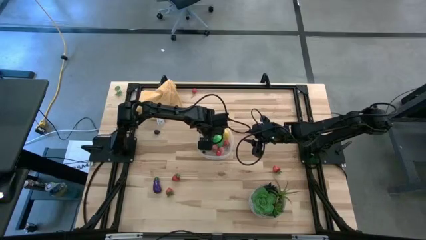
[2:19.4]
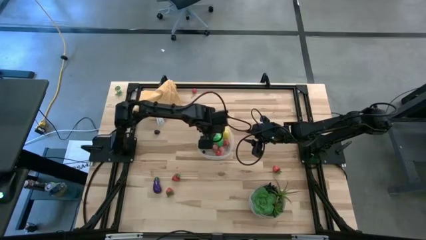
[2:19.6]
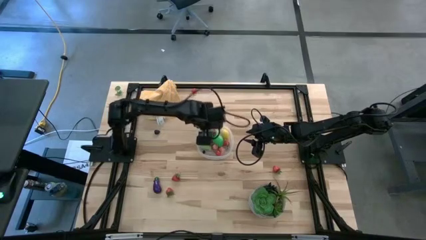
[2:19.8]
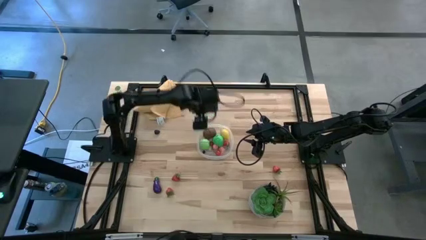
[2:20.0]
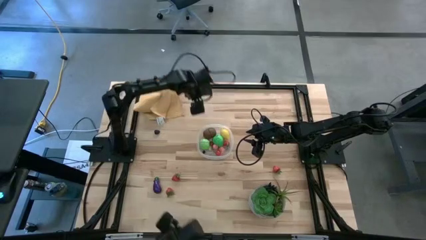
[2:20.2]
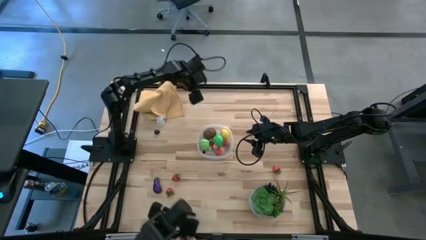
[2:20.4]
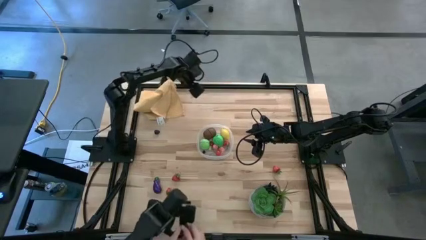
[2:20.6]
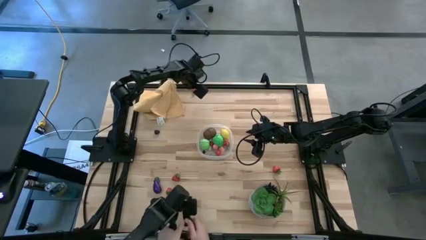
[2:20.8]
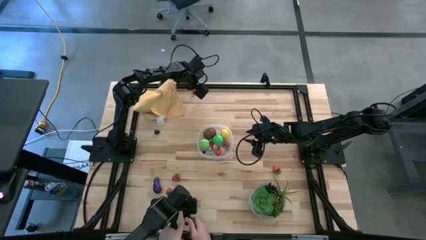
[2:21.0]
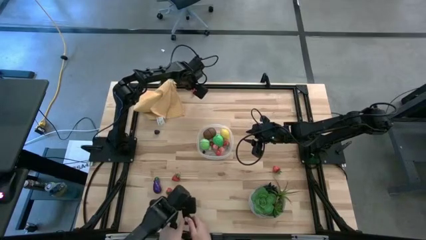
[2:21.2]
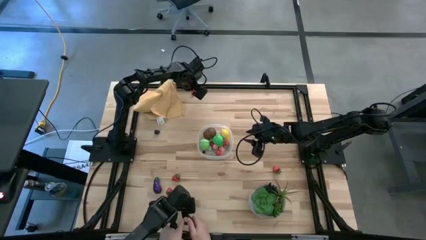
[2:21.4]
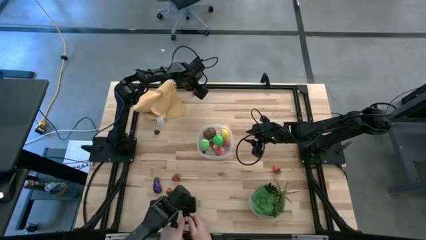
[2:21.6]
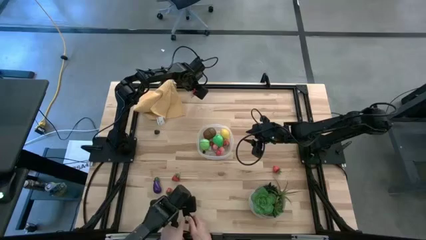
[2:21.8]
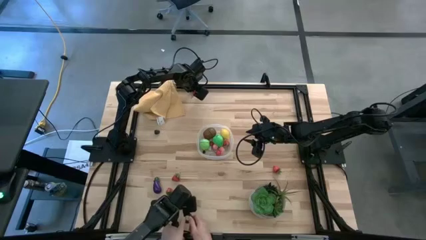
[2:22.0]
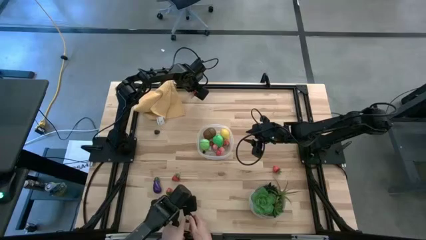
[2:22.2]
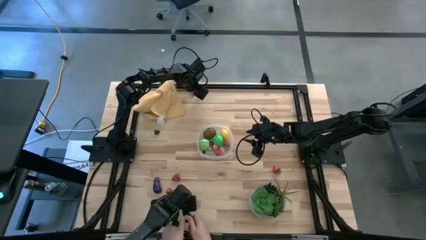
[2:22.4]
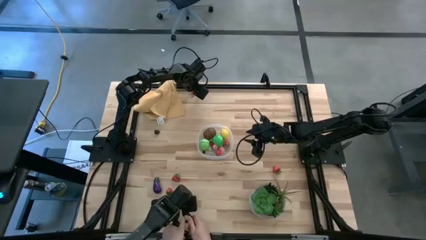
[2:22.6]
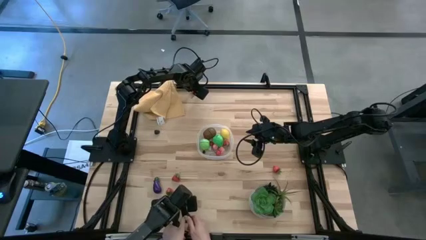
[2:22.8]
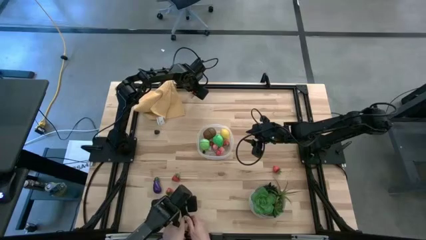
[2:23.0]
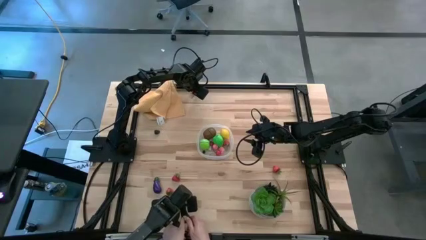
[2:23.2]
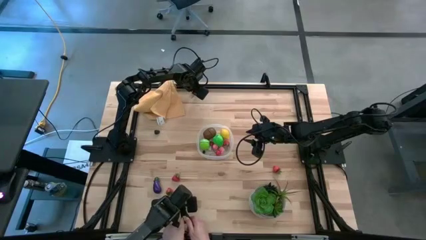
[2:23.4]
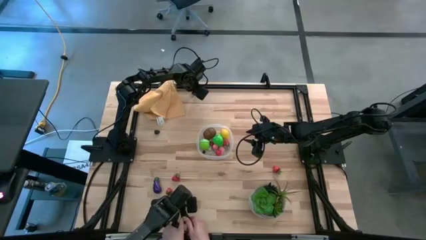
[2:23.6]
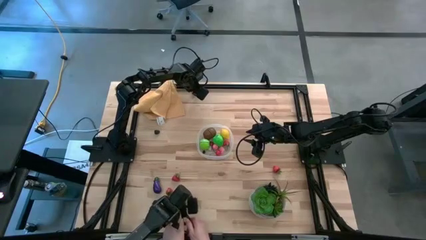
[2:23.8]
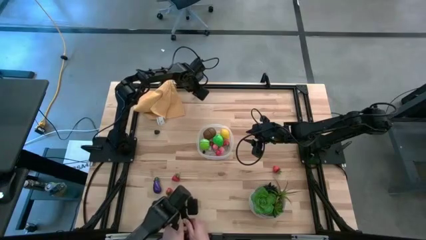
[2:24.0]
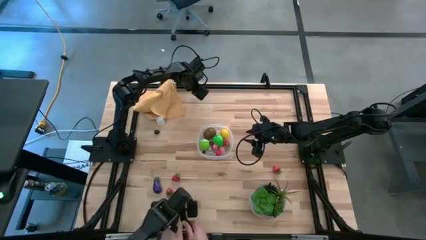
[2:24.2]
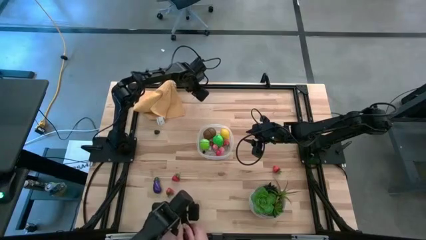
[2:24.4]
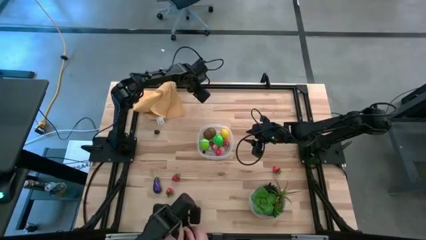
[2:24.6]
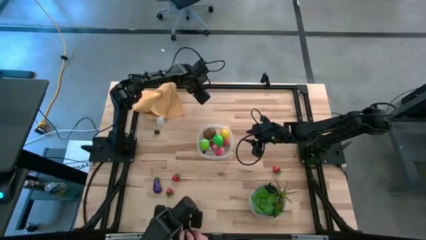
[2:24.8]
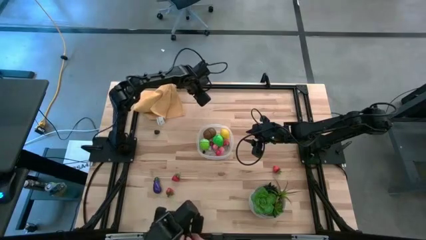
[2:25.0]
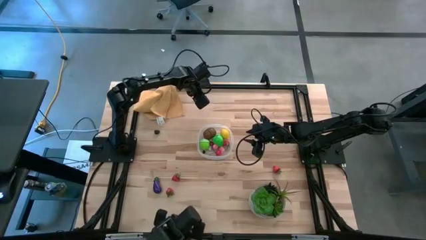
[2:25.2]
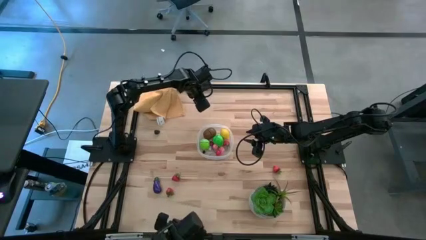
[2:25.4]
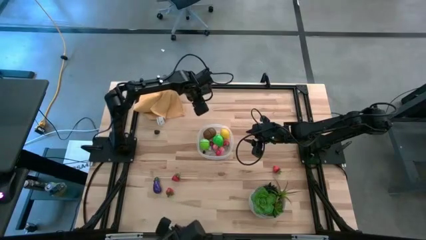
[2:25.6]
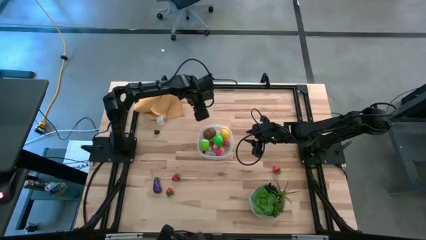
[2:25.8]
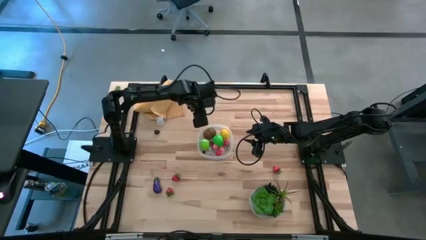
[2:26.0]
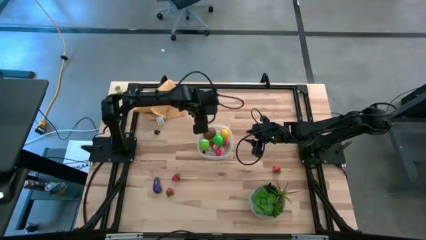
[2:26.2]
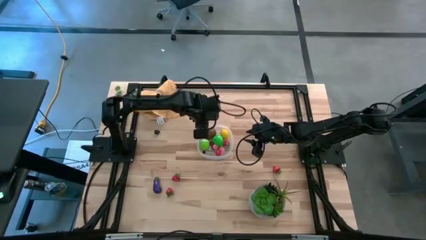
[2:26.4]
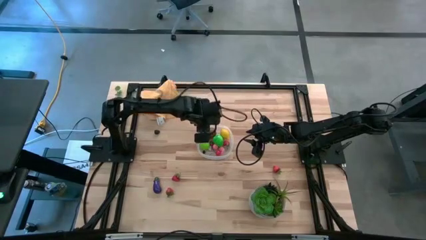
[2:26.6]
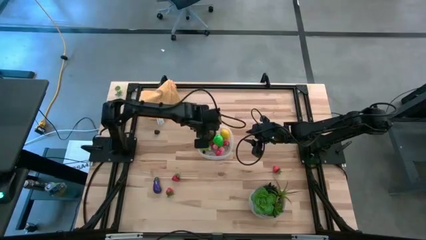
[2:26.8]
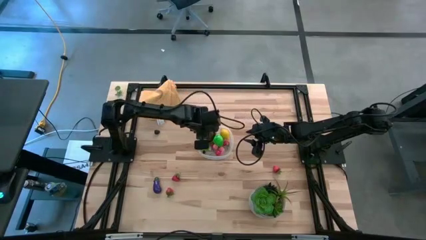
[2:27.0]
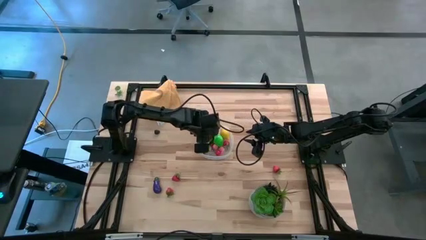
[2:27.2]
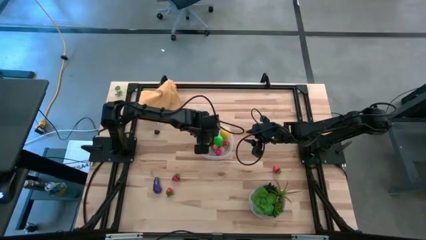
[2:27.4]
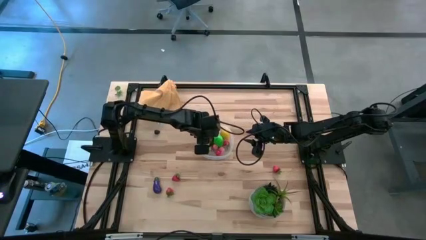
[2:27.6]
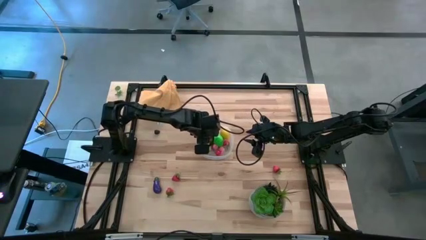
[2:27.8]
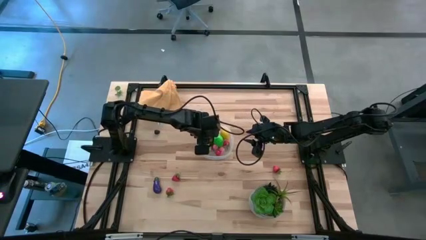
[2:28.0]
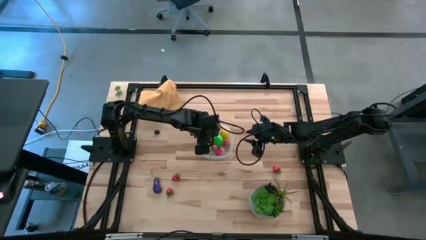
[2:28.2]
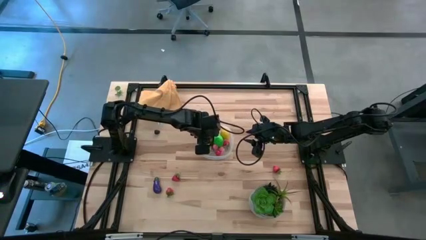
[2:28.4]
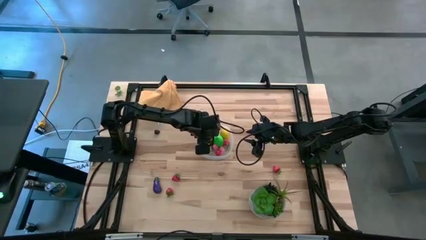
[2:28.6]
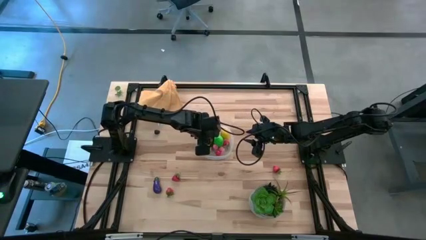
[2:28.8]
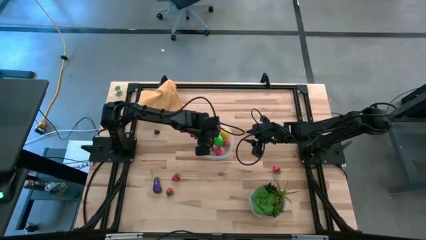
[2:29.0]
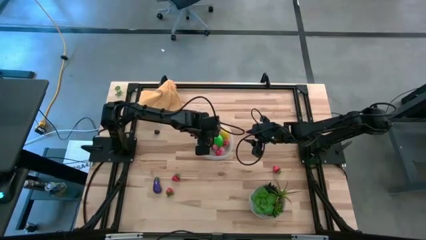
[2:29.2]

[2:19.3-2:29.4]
Task: Pick and placing Produce into tupperware
Put the red cherry into the transparent bin

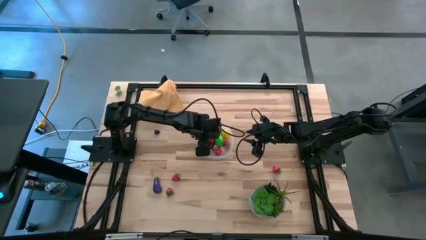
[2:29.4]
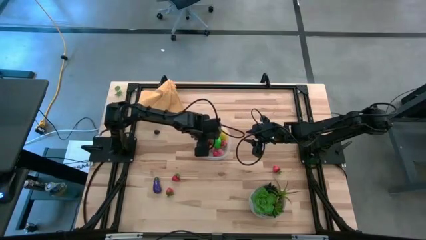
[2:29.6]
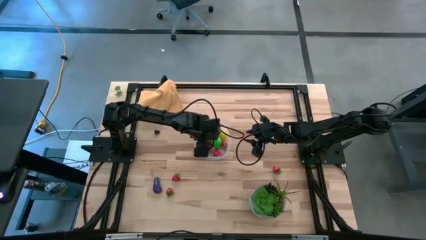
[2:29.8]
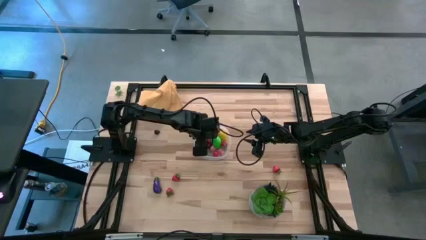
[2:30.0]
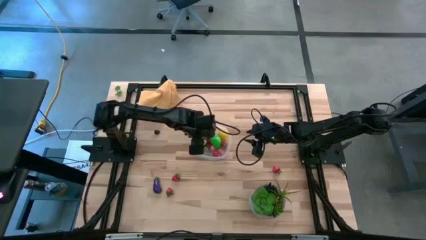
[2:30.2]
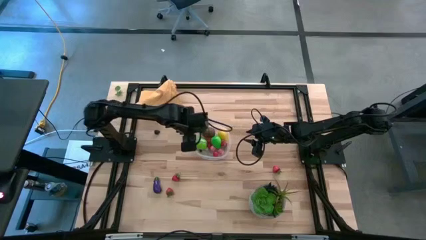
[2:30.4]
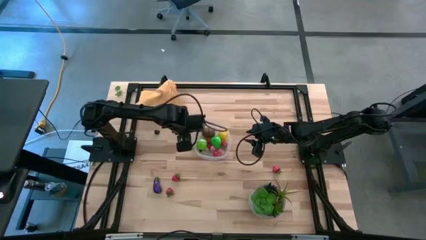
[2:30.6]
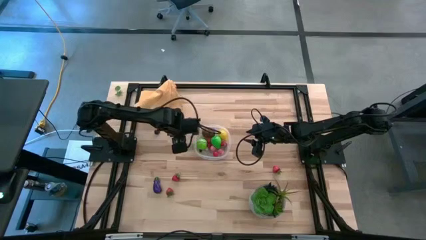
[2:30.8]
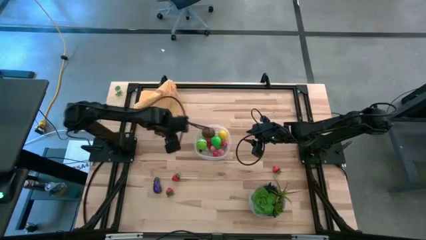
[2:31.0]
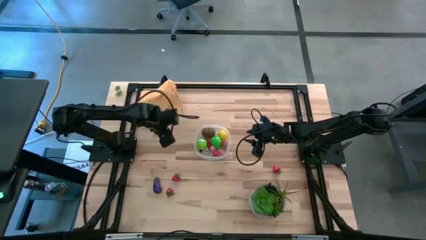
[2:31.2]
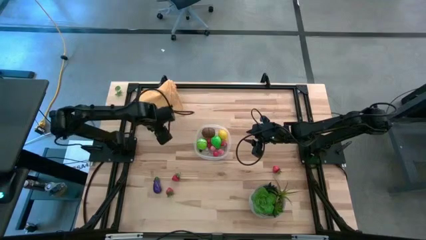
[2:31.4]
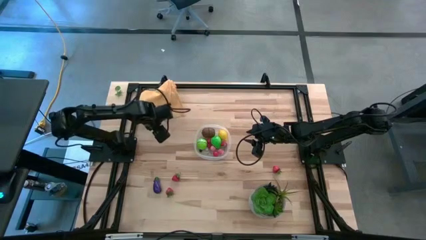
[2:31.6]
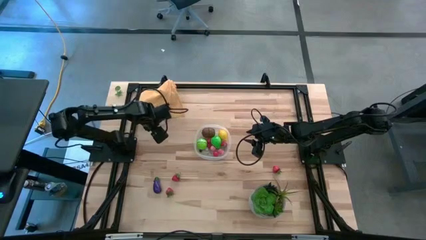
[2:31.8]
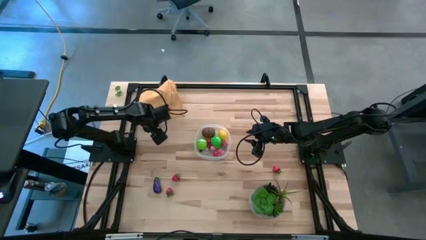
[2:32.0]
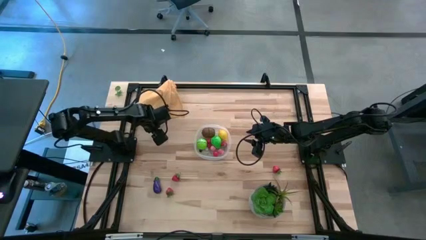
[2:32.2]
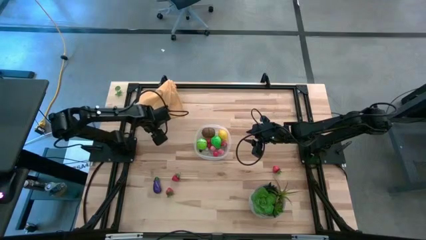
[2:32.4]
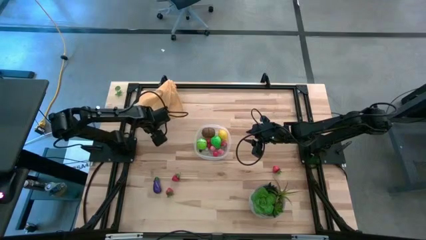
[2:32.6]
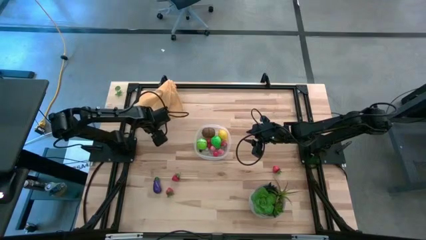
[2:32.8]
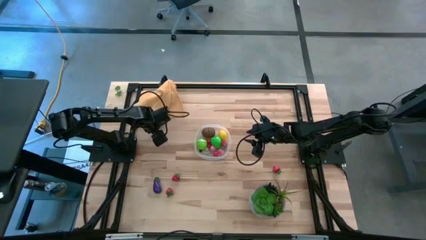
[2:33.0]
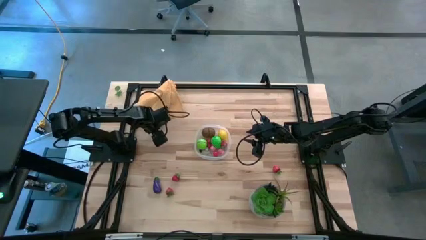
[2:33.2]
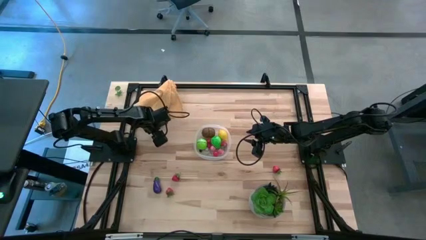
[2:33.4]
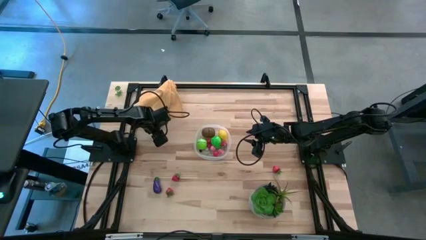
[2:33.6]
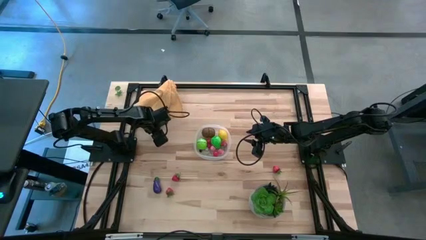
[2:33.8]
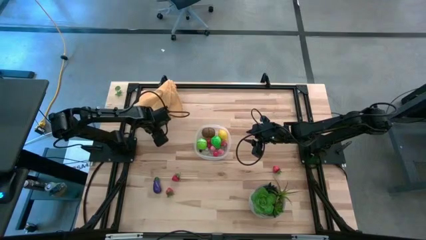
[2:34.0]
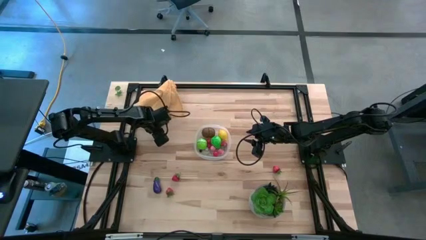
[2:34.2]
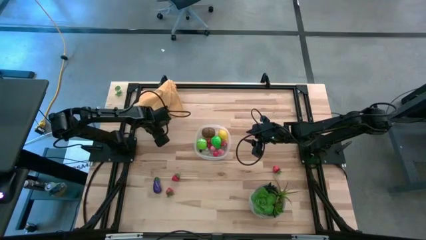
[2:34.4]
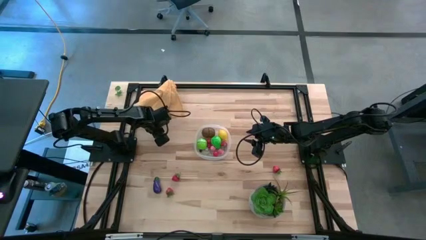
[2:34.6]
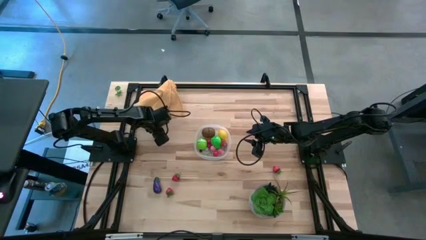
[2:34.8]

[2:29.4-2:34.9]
Put the blackberry into the transparent bin

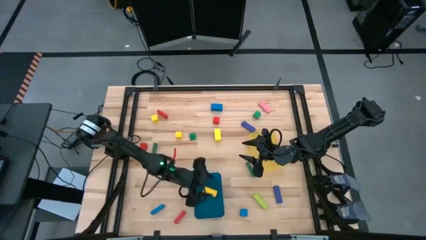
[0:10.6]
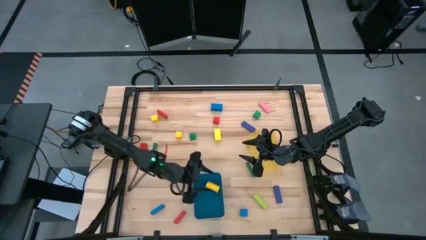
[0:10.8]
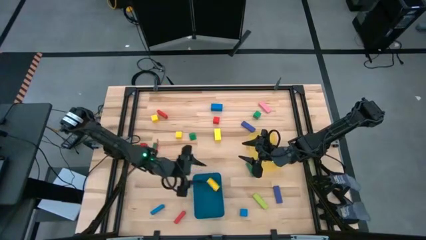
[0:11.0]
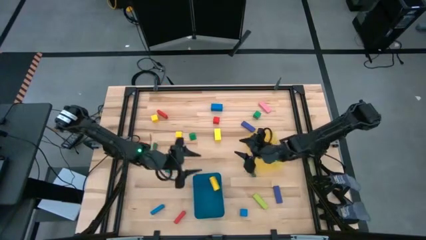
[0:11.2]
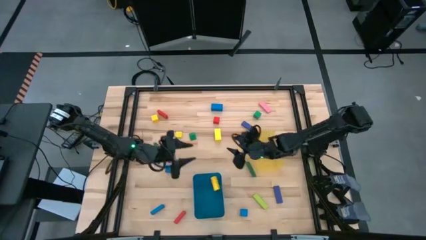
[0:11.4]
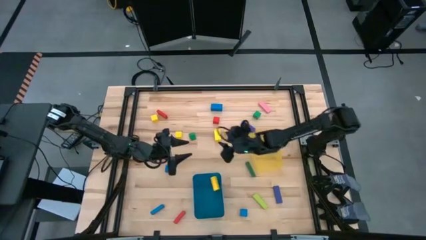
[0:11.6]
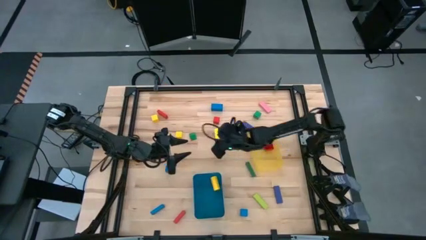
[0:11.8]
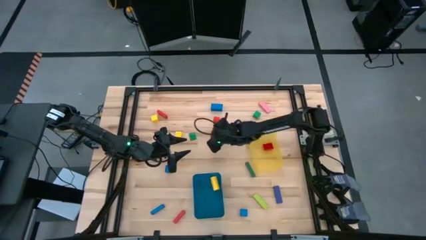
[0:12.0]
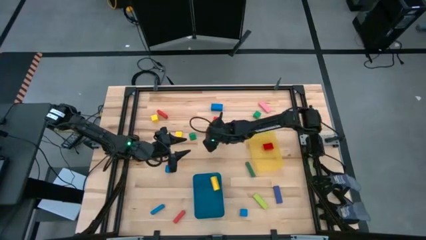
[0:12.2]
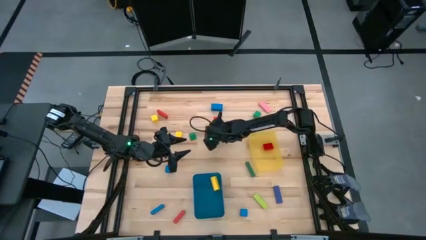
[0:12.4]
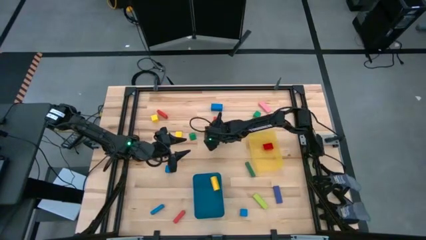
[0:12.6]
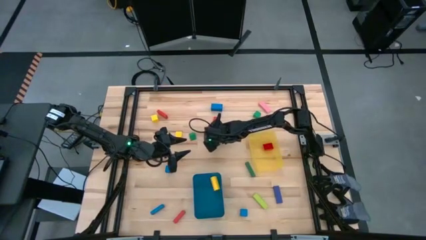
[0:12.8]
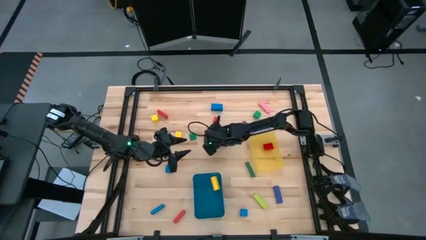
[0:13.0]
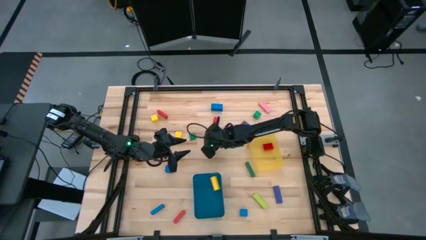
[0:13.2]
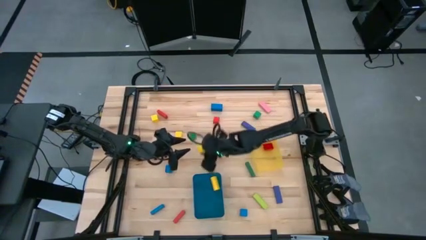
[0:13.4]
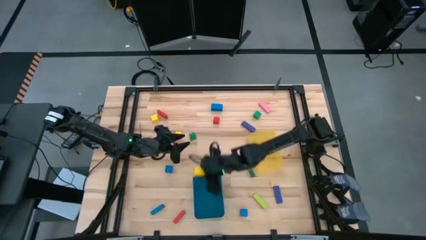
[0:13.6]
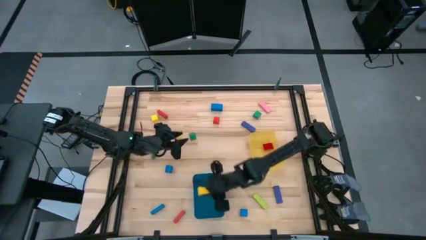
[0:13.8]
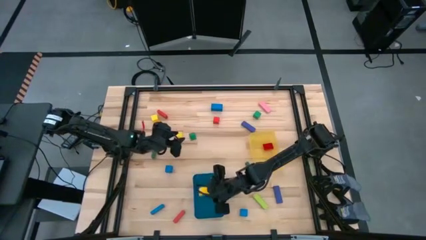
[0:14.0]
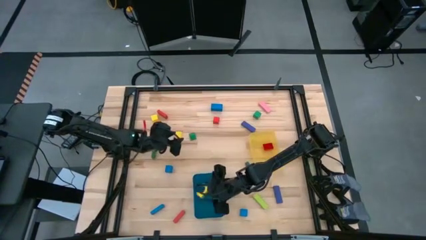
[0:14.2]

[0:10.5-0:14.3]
Task: Sort blocks by size
Put the large yellow block into the blue bin
